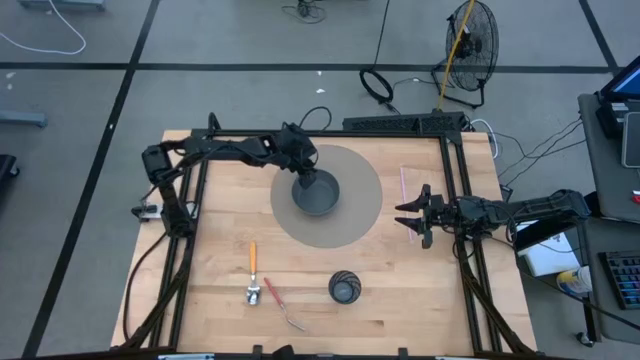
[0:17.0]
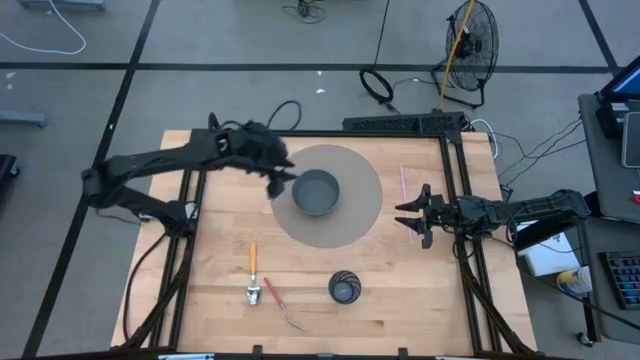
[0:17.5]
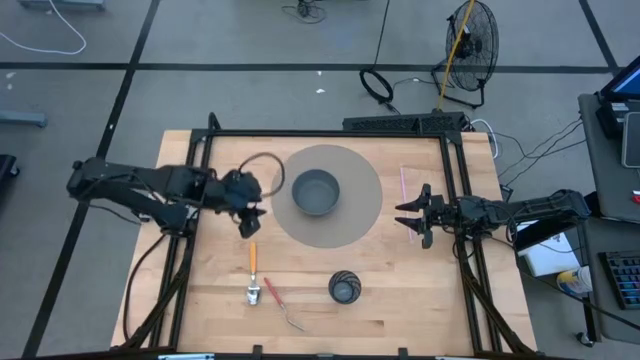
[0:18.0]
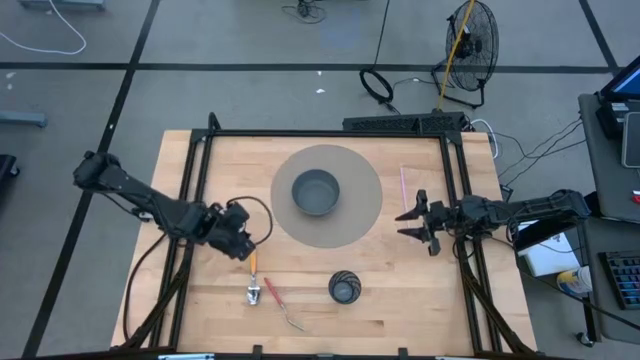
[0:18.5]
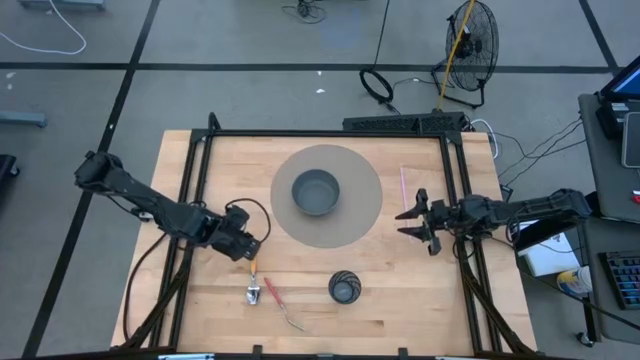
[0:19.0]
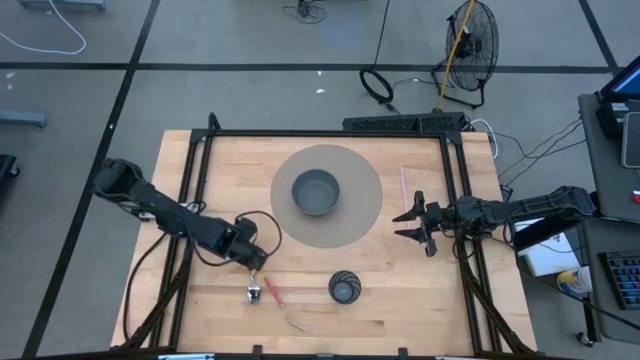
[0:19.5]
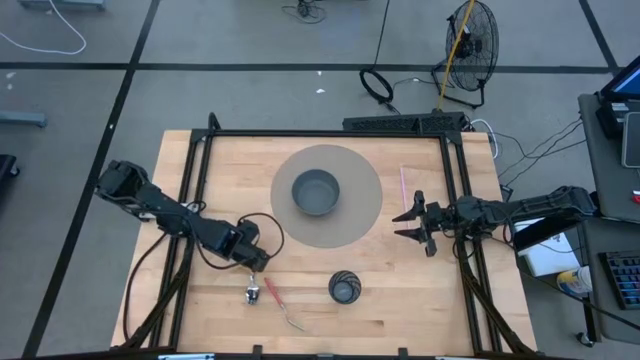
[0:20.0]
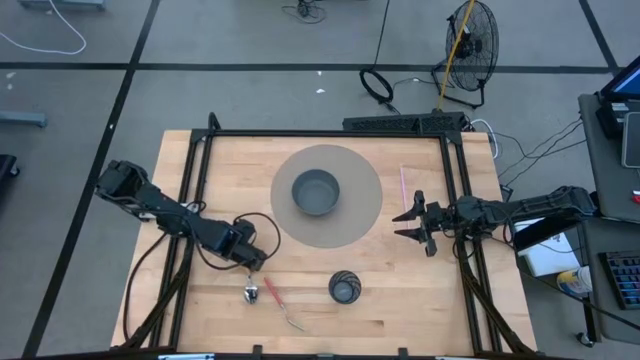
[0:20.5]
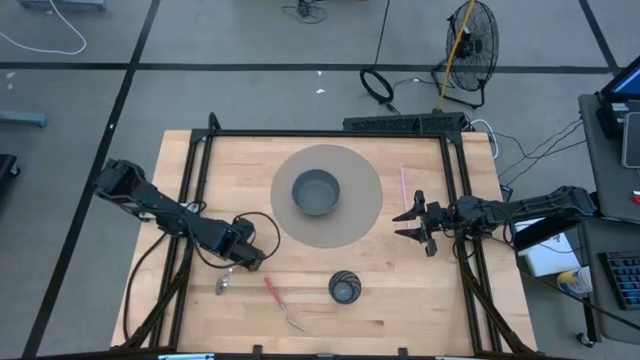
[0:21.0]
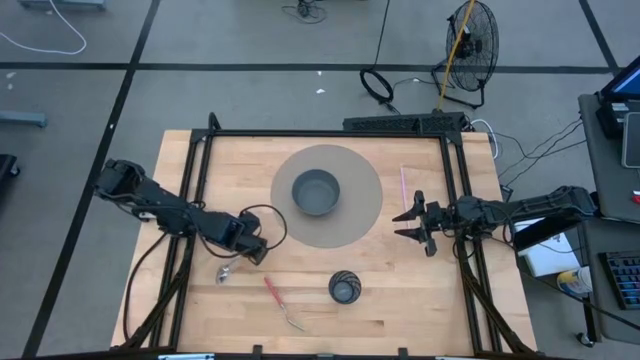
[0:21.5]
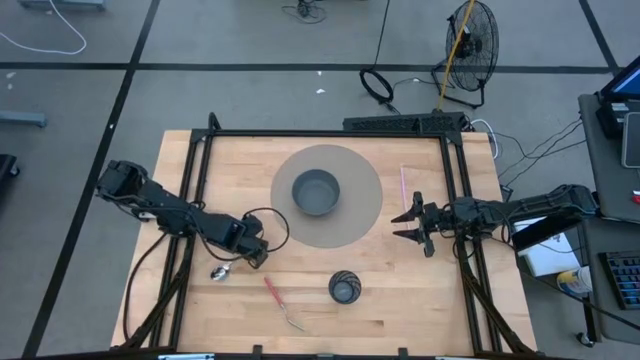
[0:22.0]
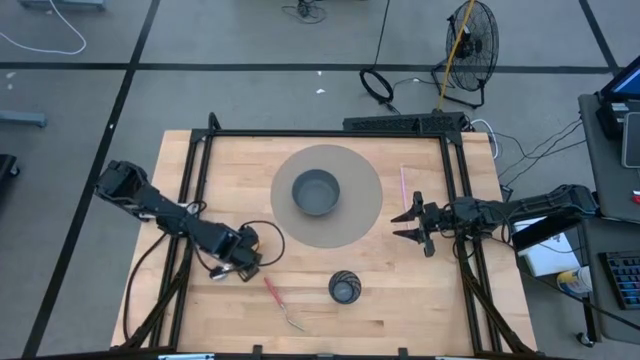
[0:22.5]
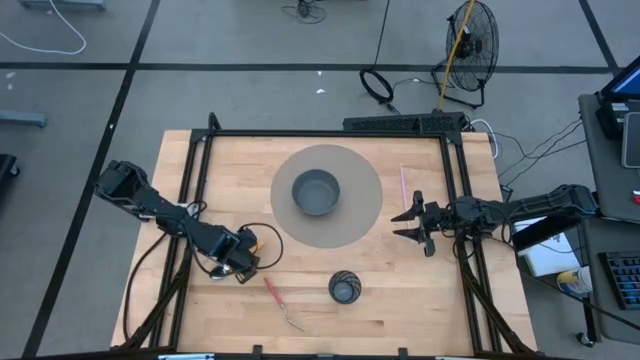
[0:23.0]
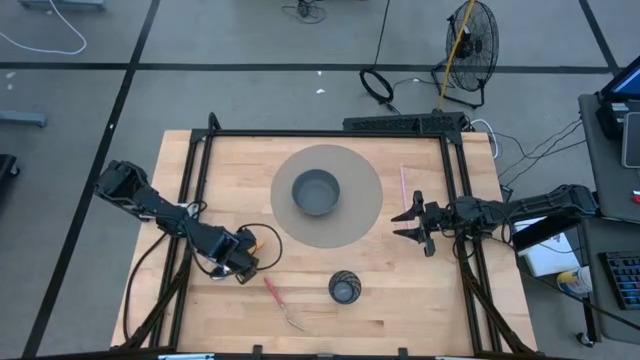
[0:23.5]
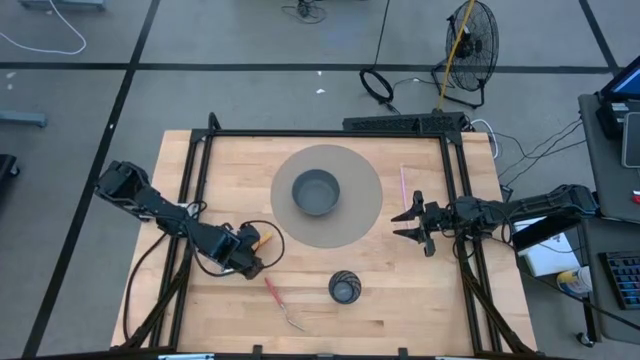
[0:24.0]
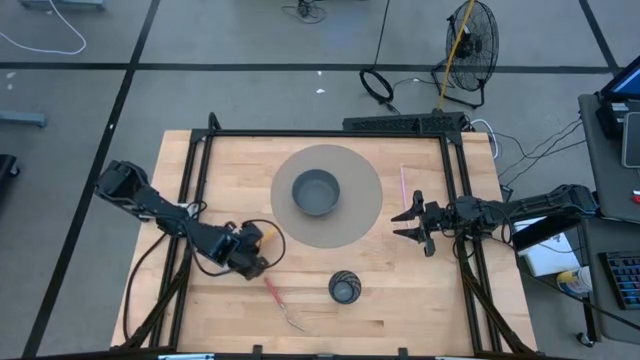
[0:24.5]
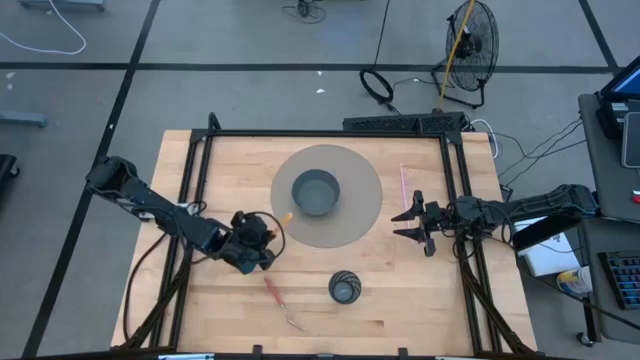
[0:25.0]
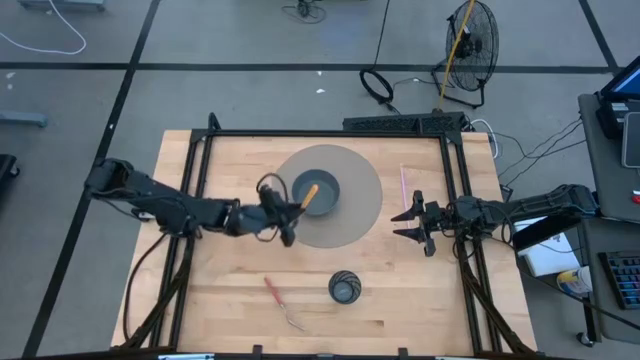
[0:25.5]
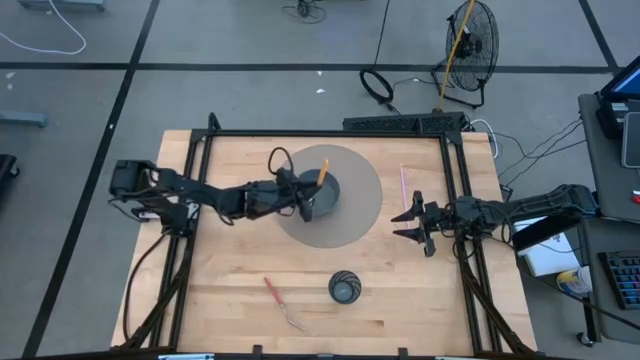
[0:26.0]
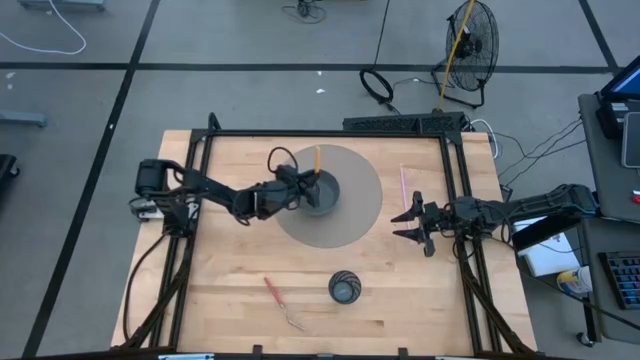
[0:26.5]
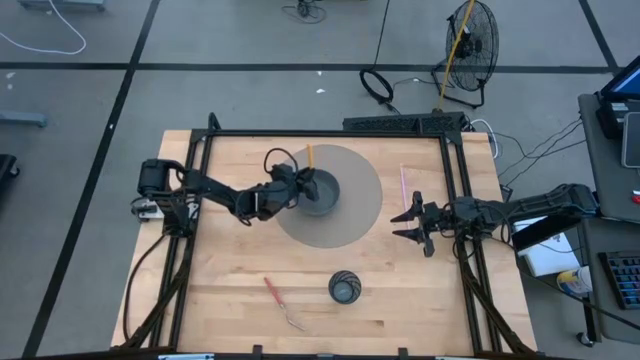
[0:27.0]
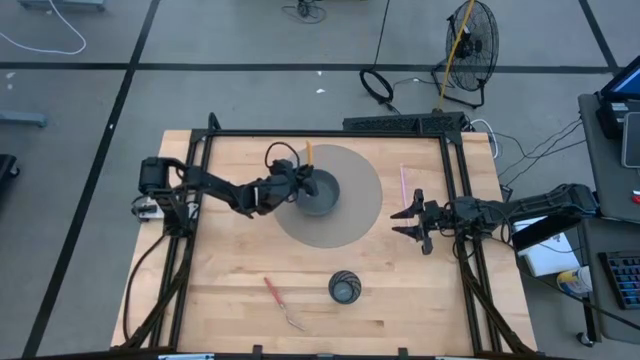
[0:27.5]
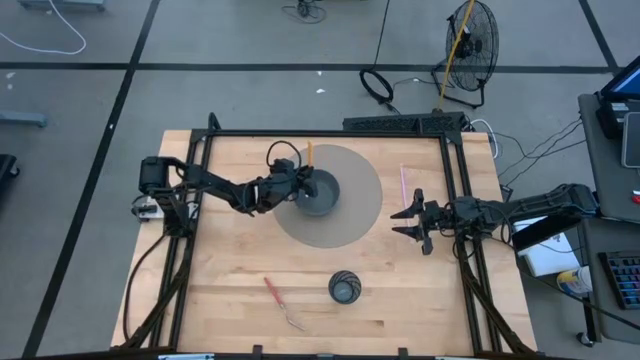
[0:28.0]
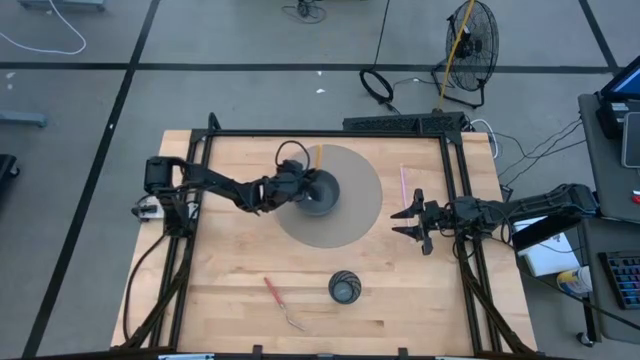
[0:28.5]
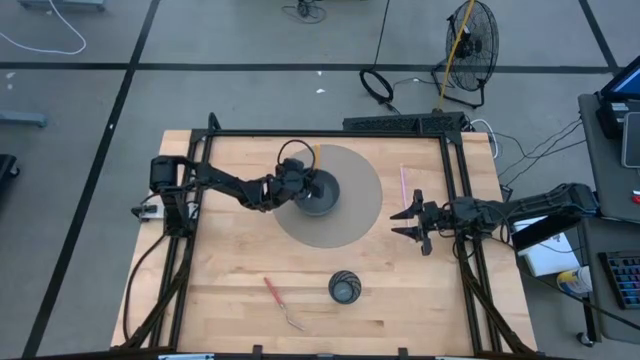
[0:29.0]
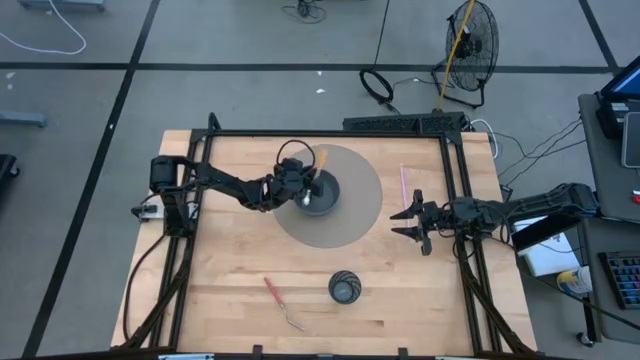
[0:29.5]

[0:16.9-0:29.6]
Task: Pick & Place Utensil
Put the yellow spoon into the dark blue bowl

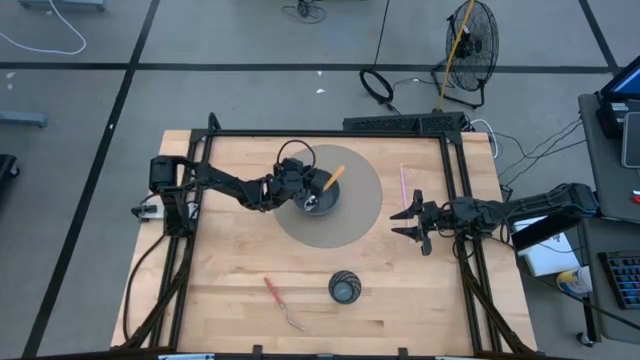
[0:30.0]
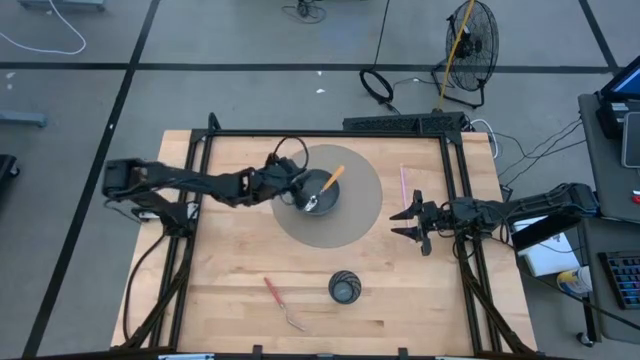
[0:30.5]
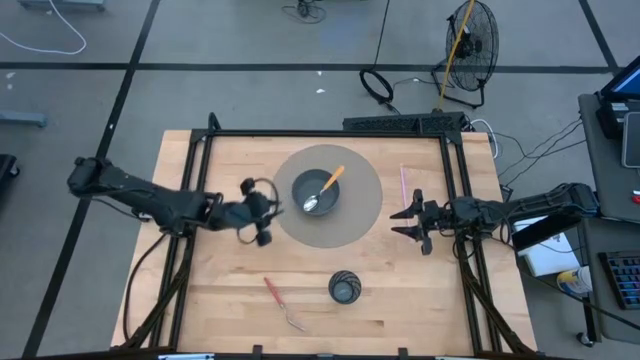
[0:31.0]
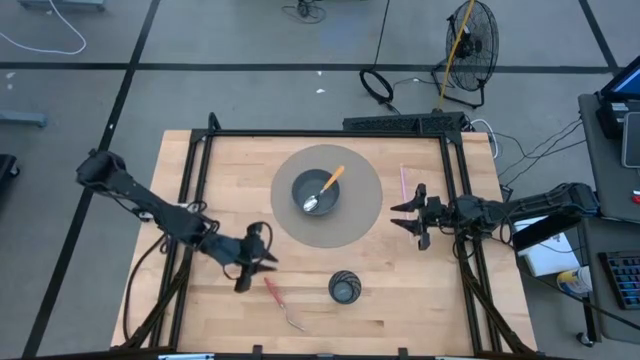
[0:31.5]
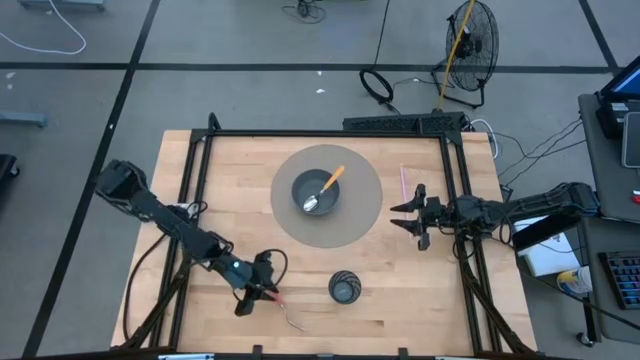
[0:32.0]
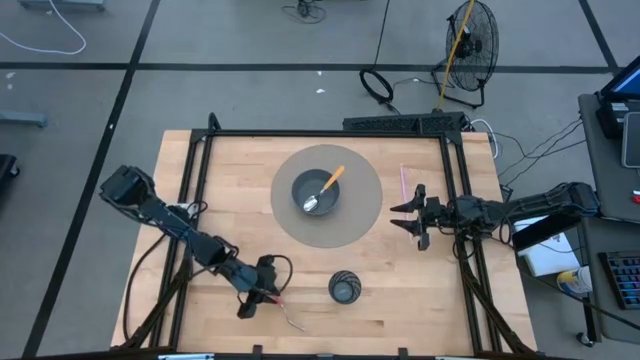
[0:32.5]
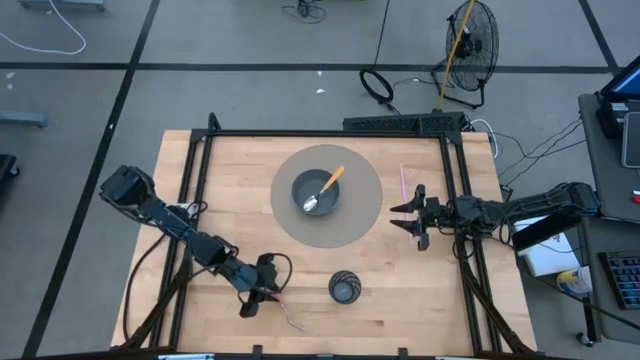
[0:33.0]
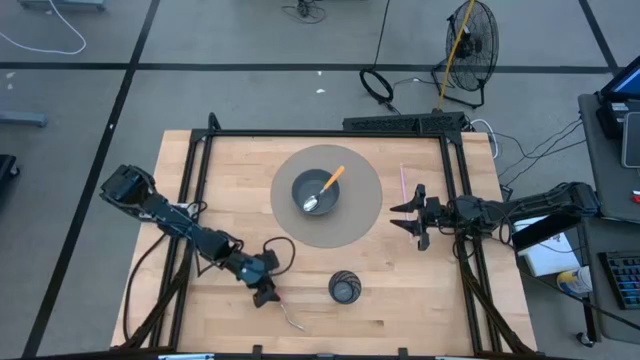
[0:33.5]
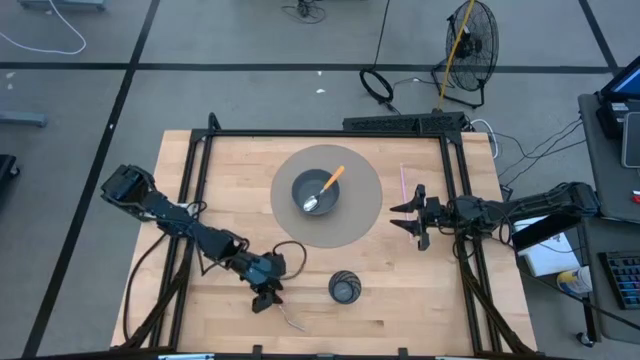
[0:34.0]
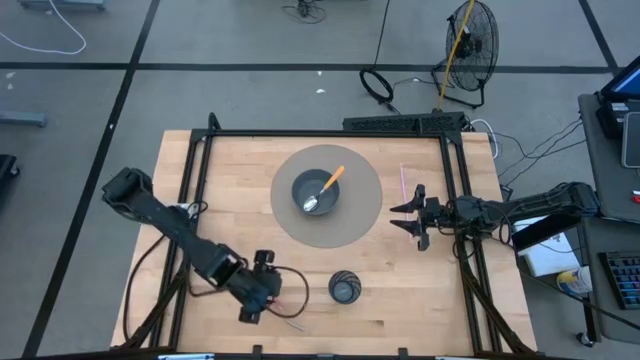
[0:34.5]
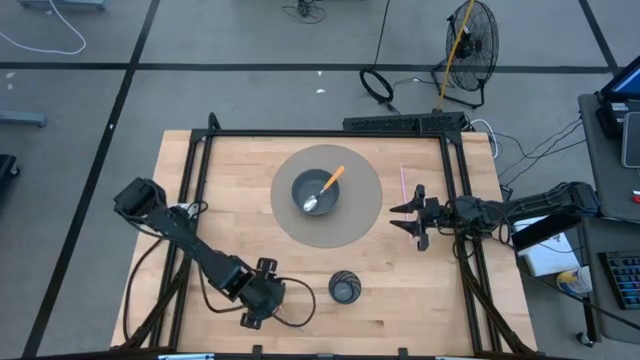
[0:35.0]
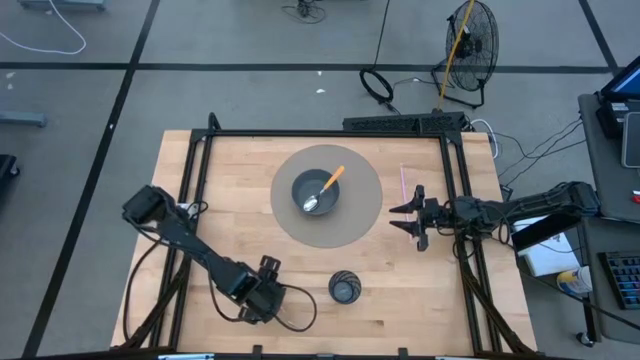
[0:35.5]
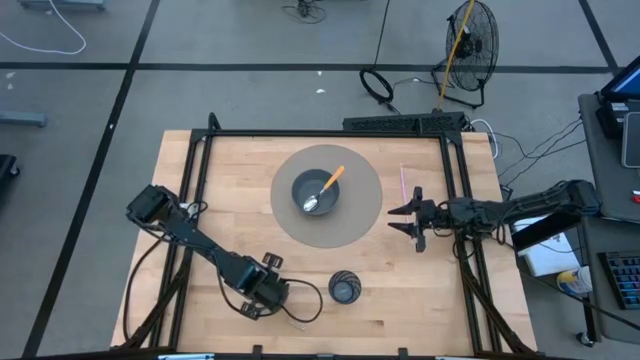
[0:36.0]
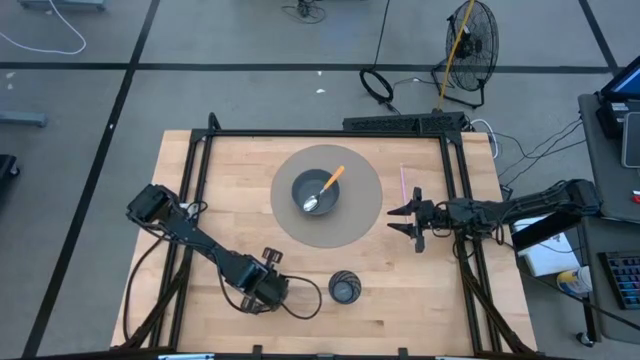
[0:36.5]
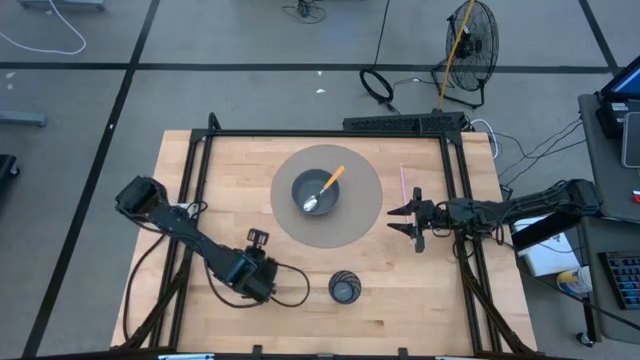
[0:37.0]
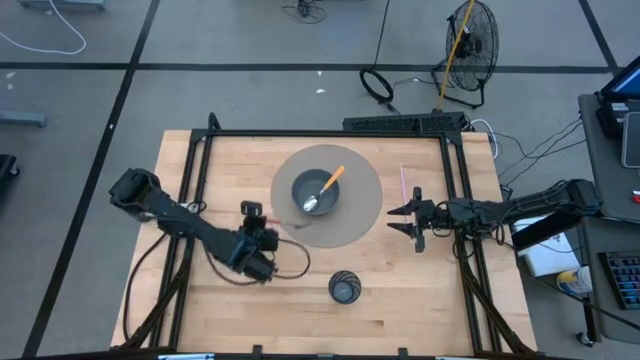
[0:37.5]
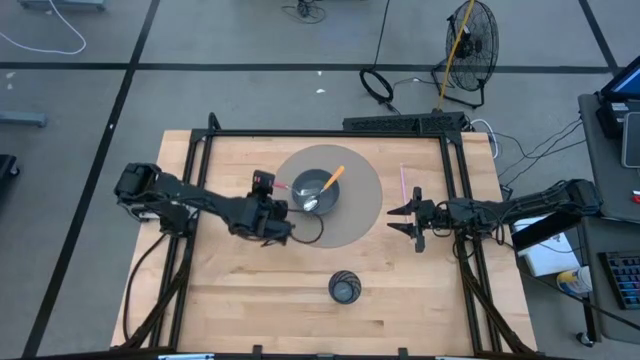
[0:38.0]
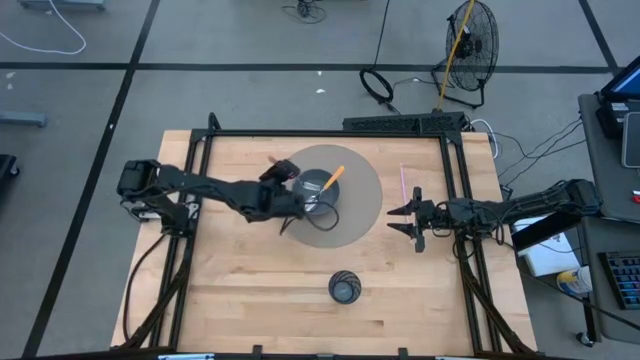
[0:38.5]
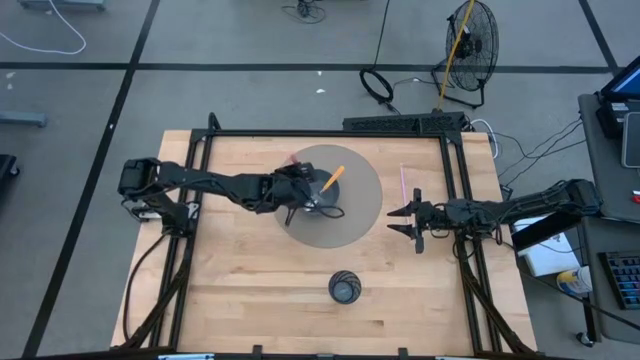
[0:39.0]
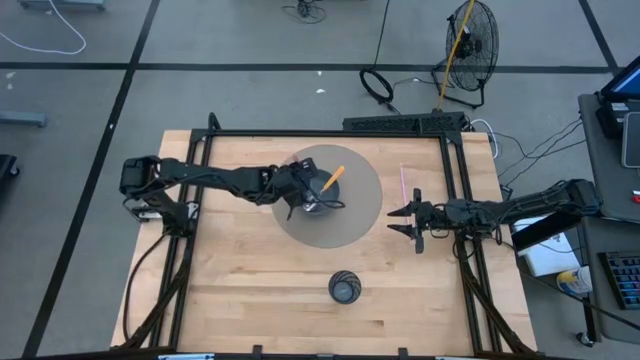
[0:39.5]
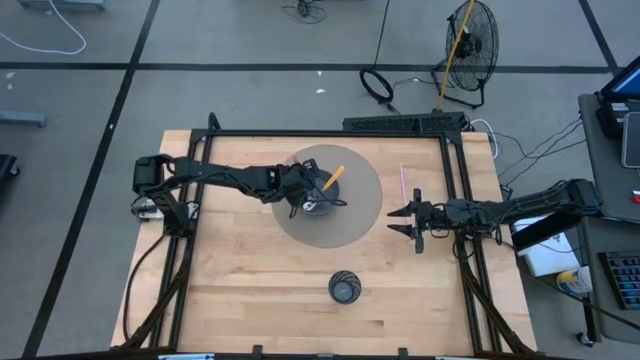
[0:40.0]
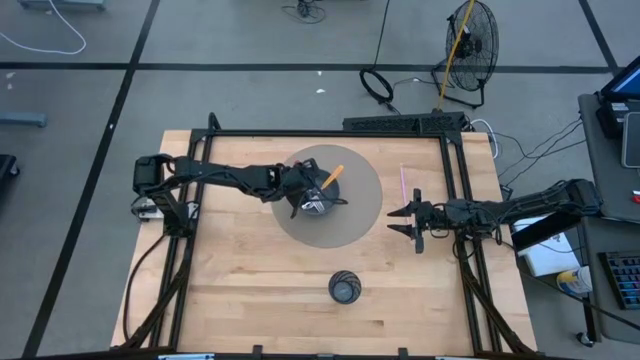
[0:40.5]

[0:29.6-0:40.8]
Put the pink fork into the dark blue bowl
